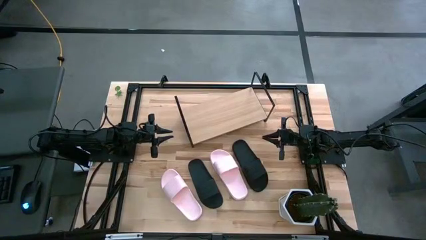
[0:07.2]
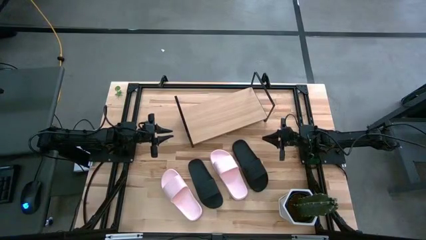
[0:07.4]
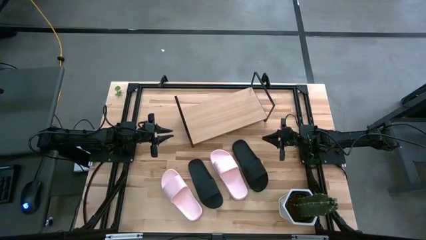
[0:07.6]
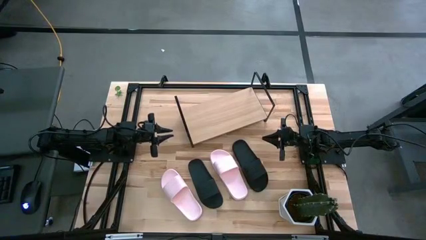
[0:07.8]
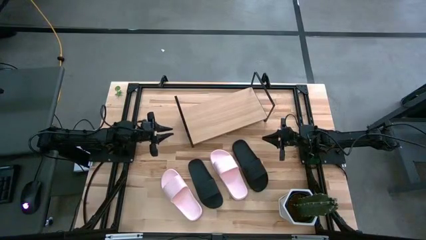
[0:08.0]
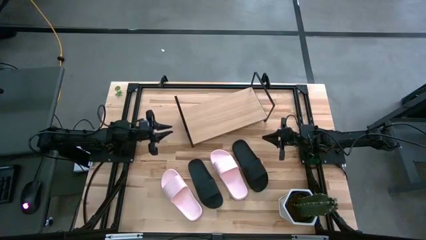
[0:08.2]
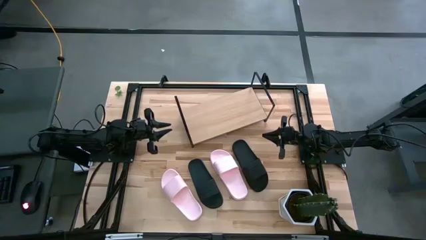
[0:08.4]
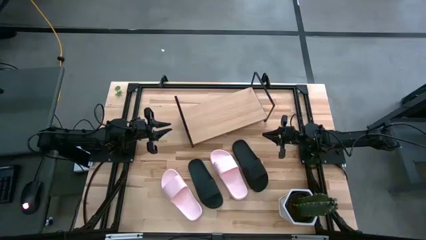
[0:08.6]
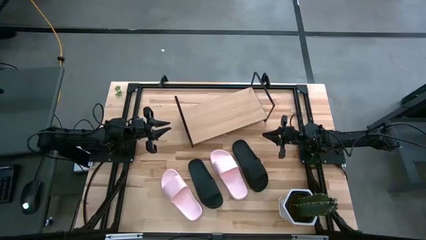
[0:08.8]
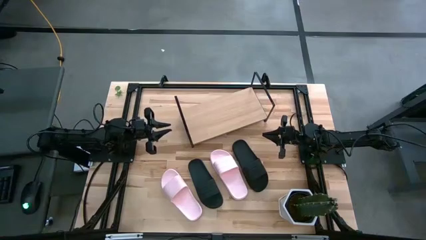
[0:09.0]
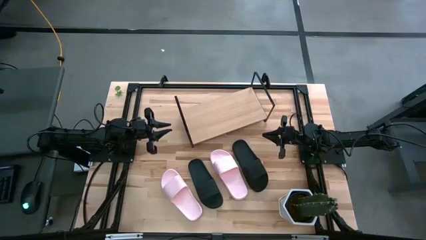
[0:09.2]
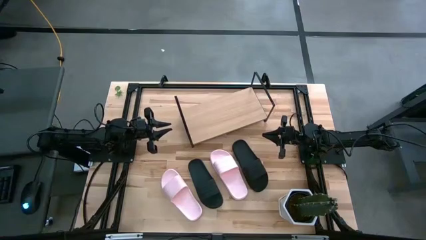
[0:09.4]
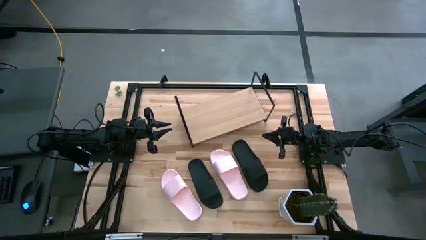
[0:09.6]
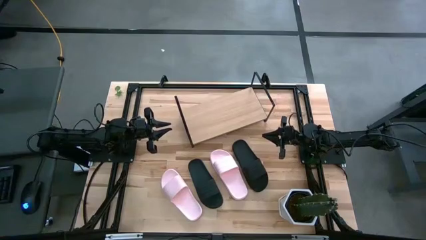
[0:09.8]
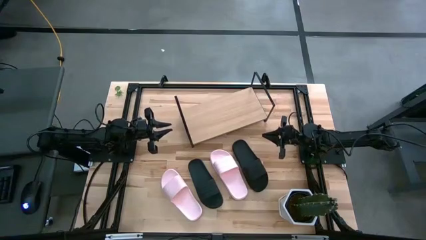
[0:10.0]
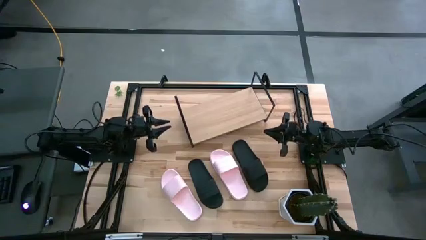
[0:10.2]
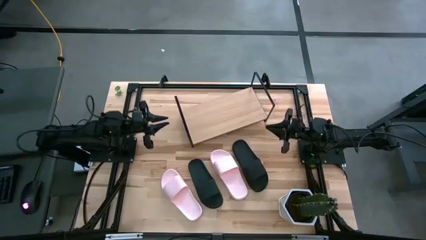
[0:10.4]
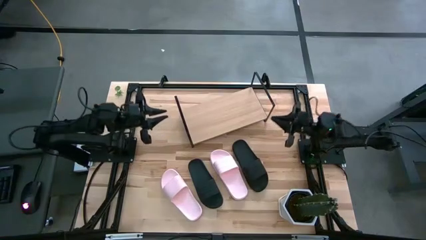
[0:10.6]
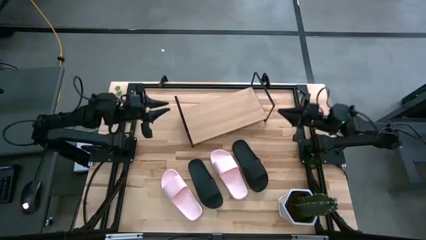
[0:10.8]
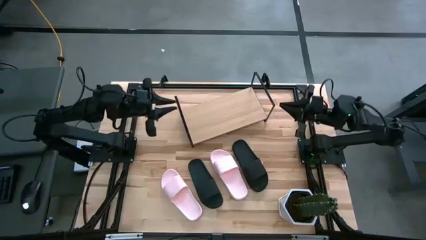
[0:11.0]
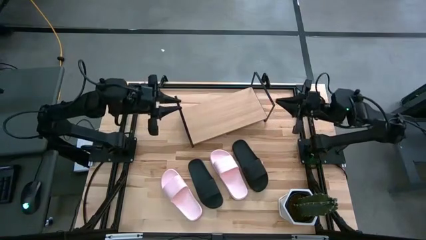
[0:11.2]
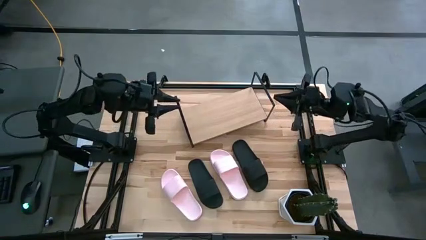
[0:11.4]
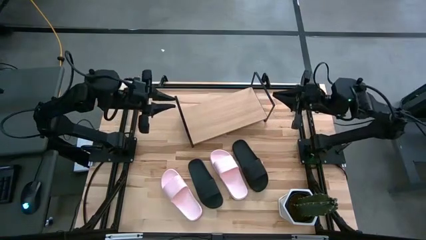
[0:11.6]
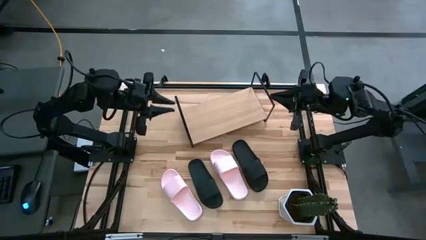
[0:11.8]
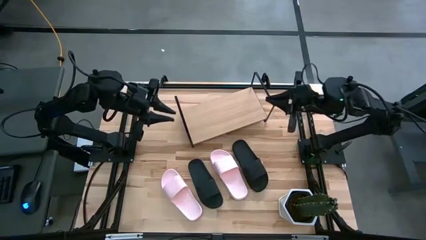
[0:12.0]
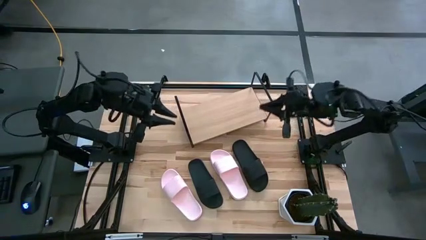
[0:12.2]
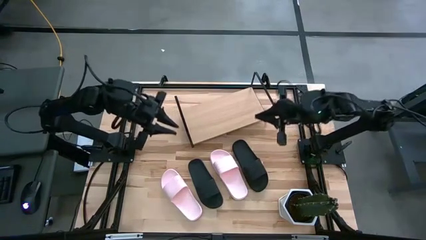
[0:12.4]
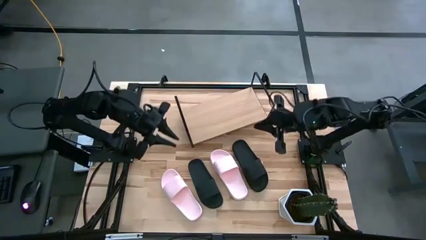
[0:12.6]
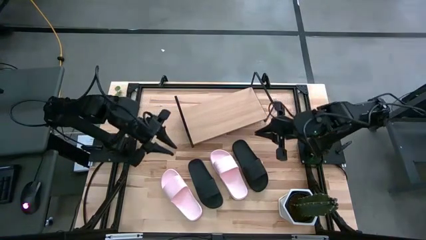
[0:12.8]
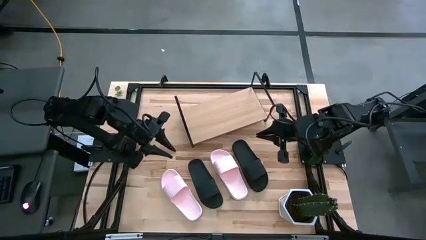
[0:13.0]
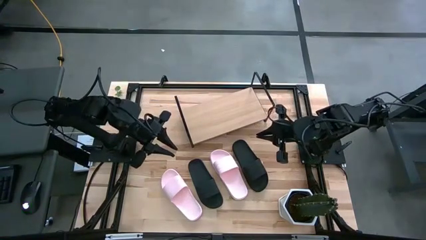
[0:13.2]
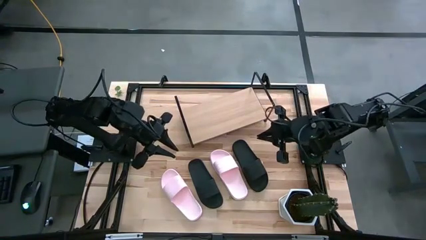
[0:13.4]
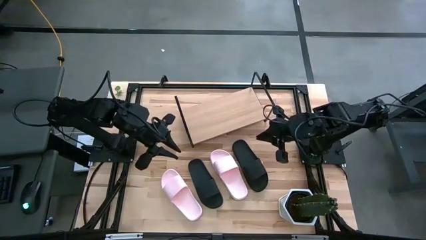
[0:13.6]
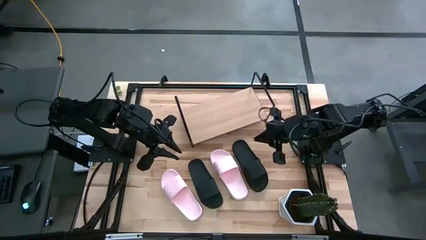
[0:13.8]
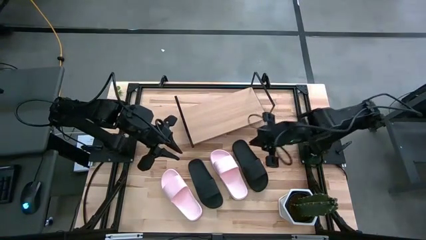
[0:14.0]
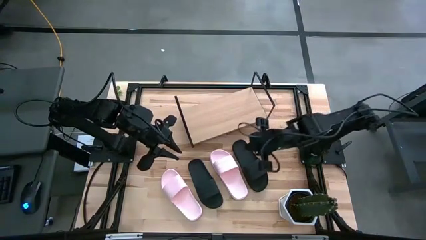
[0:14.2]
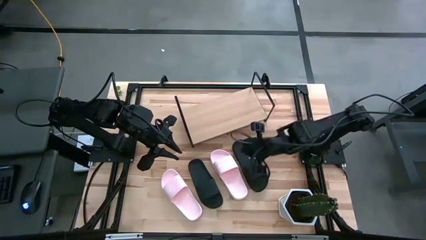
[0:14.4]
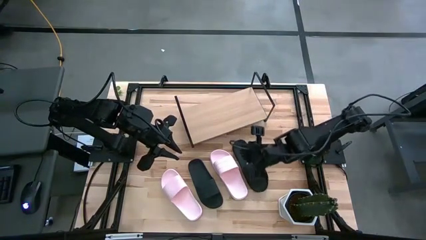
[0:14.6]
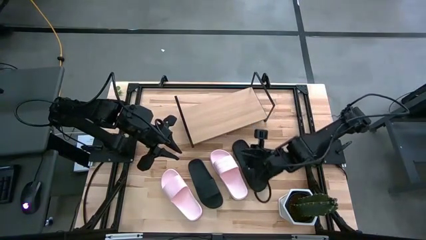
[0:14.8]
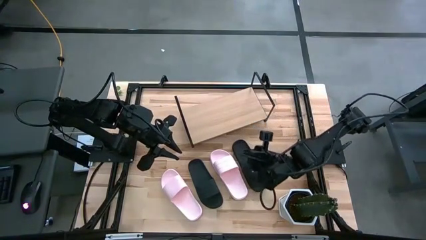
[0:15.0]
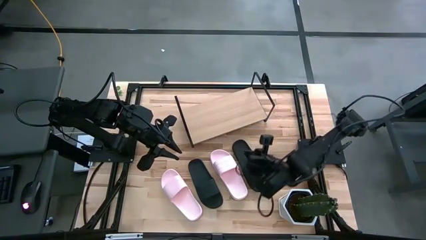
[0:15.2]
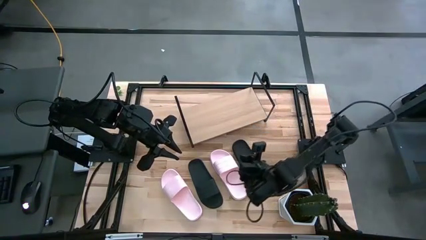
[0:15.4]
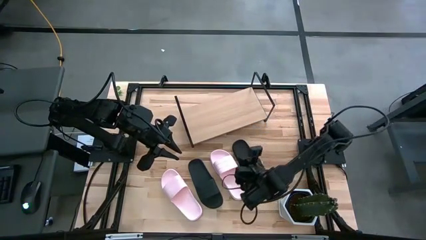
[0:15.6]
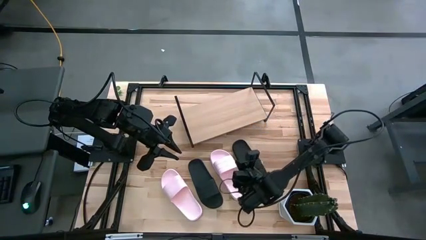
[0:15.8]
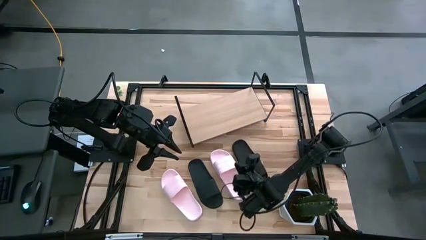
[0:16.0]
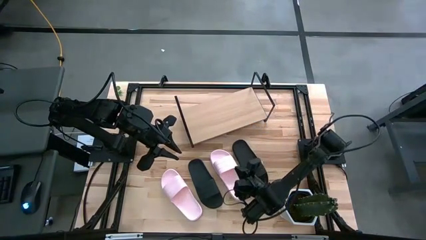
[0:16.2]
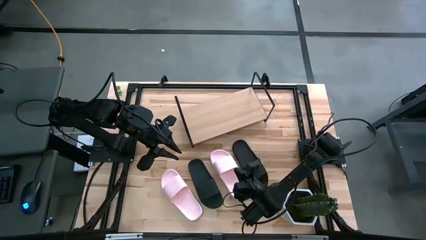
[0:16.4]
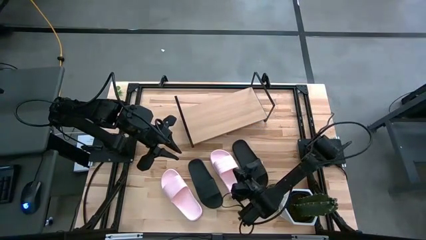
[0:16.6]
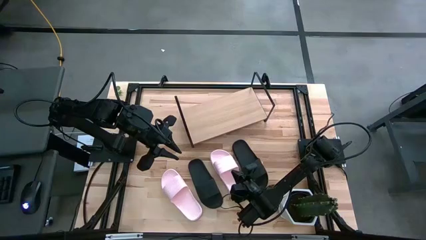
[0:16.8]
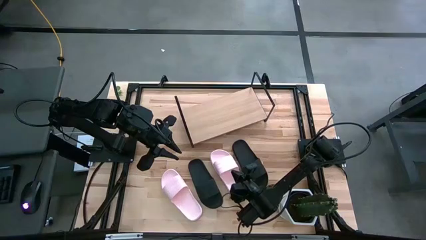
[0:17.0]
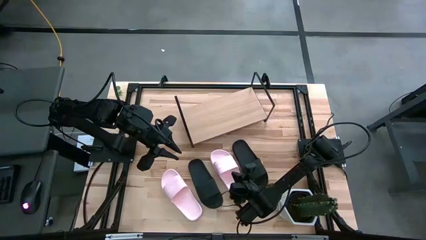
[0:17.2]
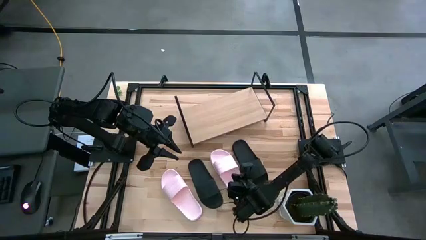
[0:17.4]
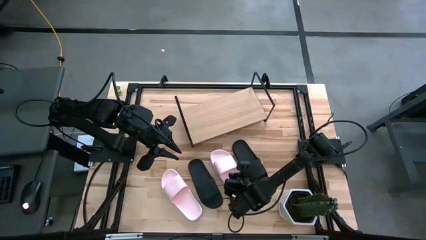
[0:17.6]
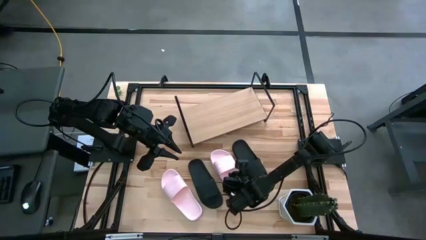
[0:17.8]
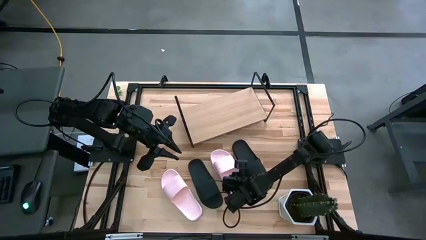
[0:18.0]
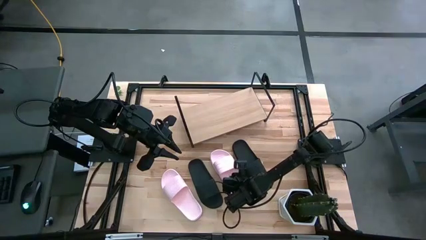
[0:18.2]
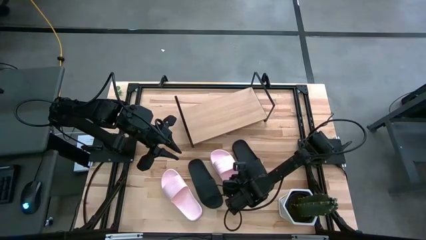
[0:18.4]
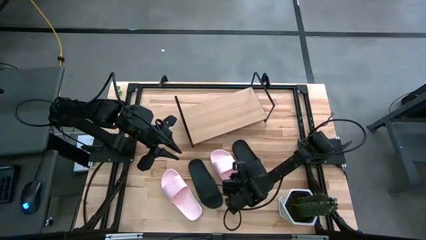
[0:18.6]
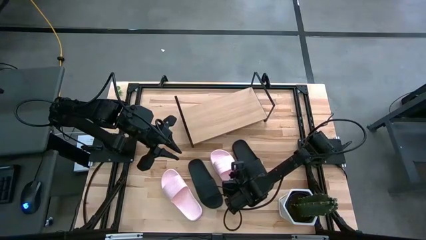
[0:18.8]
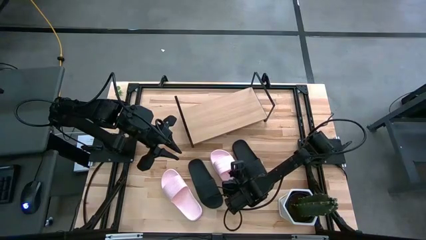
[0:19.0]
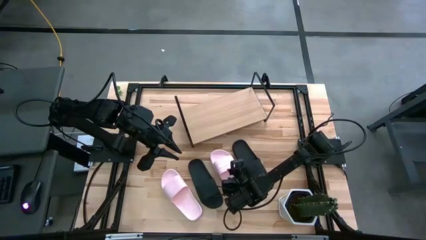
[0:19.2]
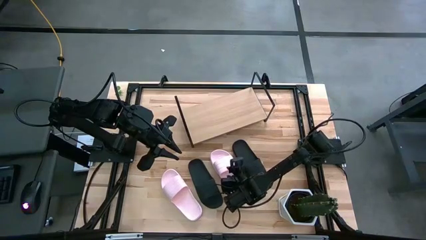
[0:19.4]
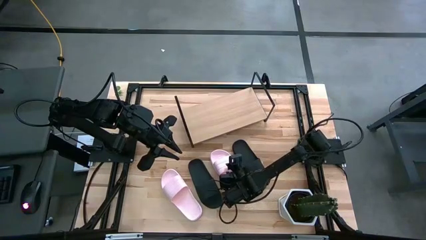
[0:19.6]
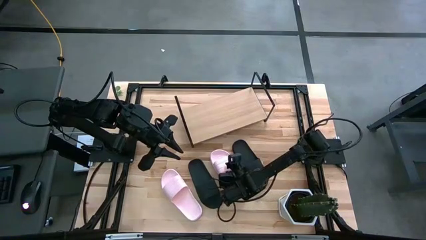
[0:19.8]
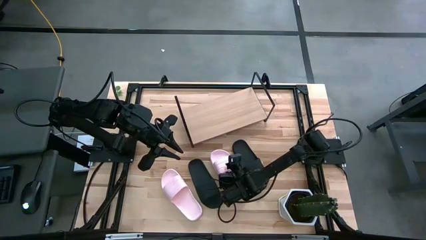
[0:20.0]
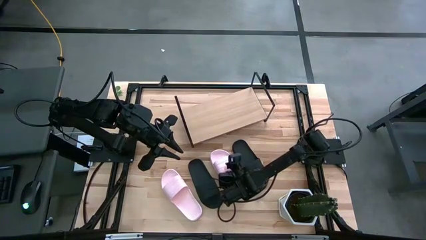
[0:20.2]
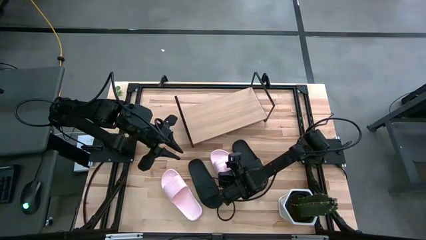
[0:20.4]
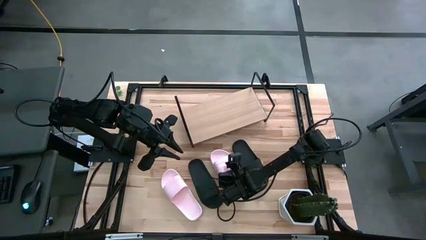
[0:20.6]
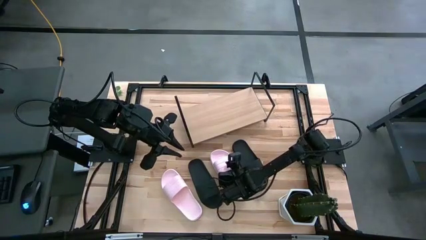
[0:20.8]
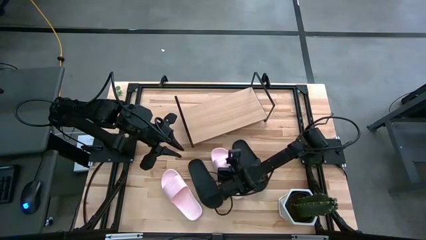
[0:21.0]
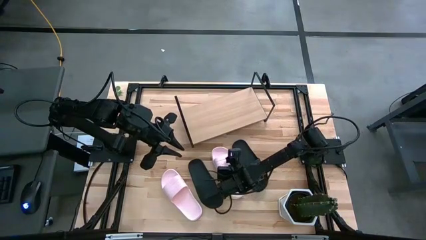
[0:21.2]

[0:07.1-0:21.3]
Task: Pick and place slides into the shelf
Put the right pink slide on the shelf
